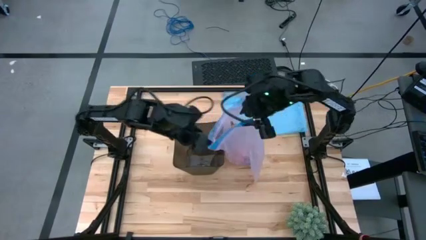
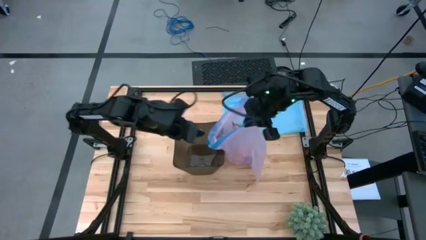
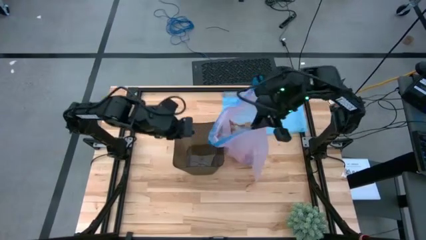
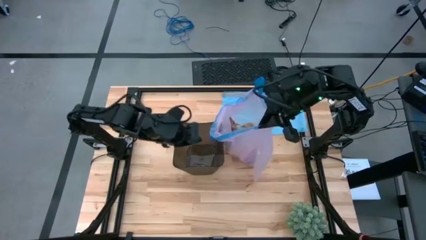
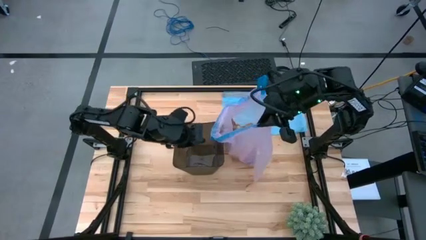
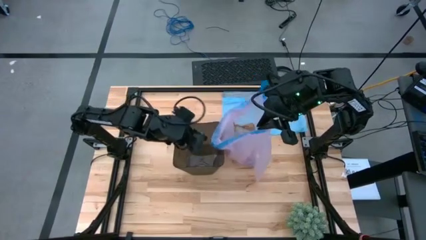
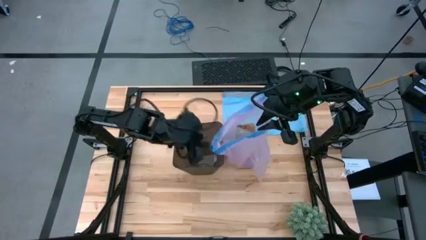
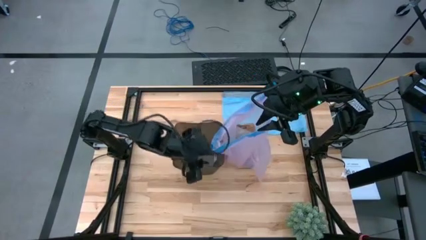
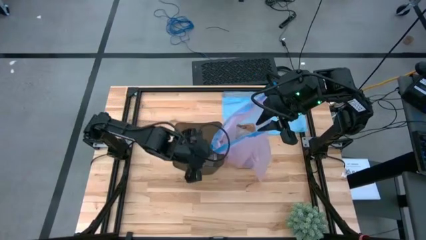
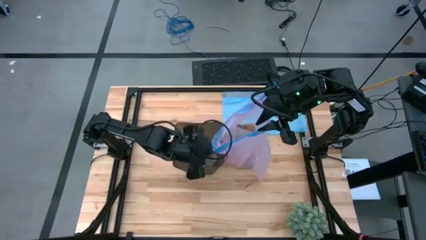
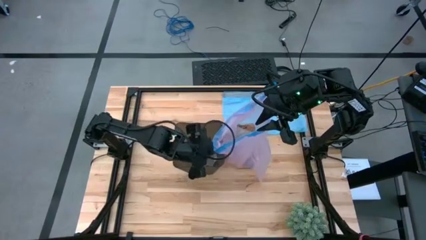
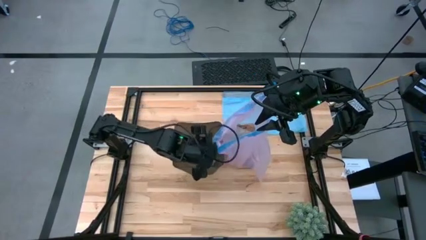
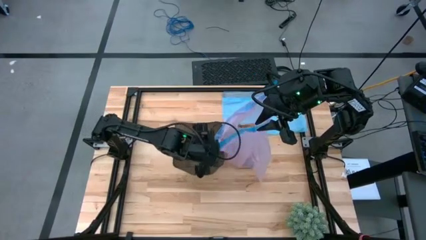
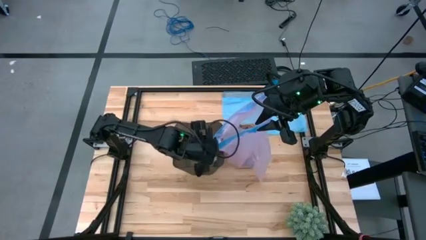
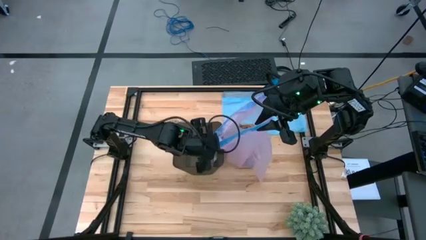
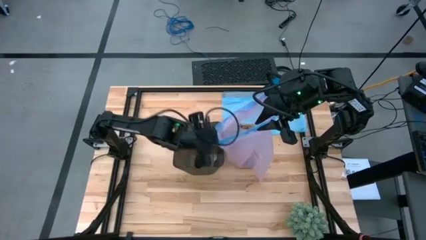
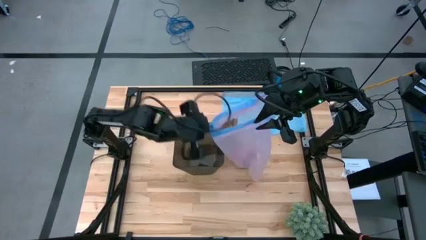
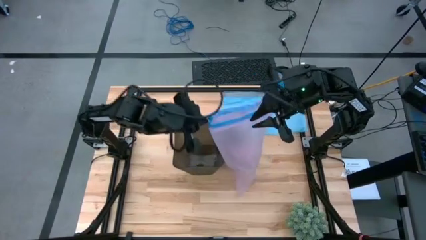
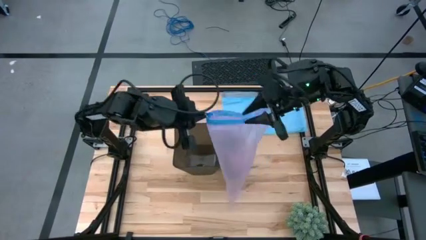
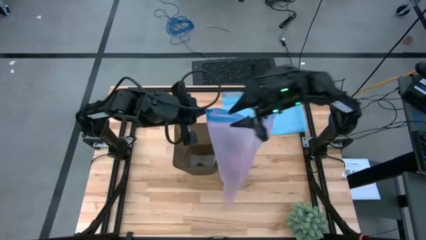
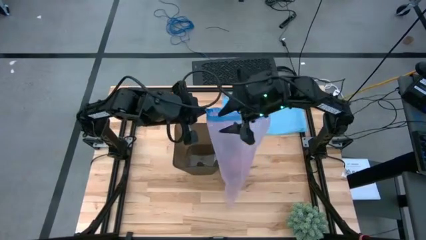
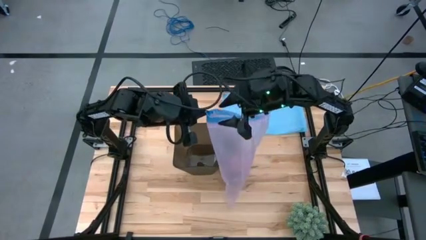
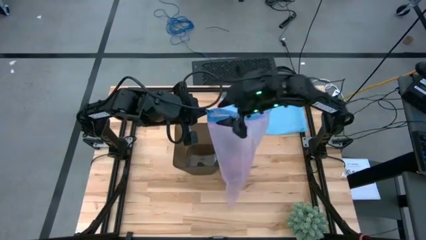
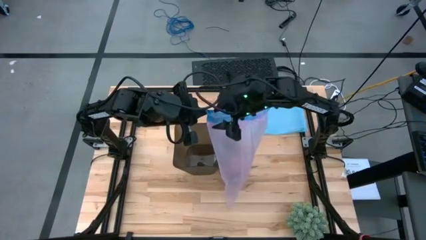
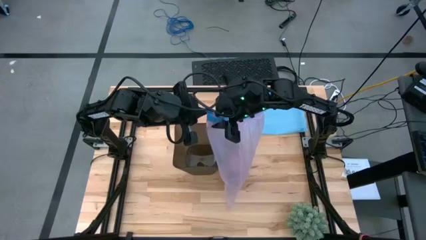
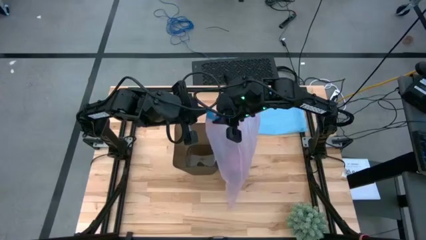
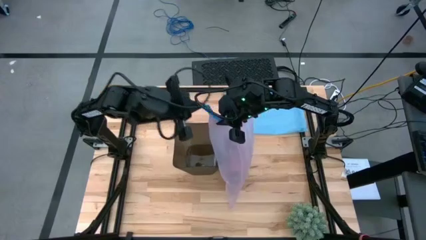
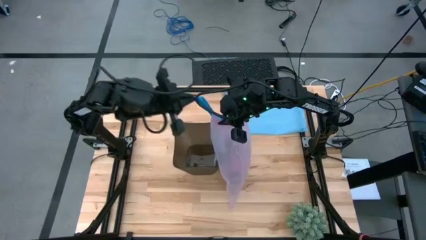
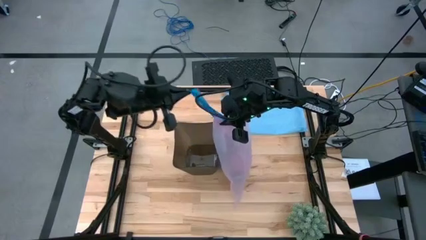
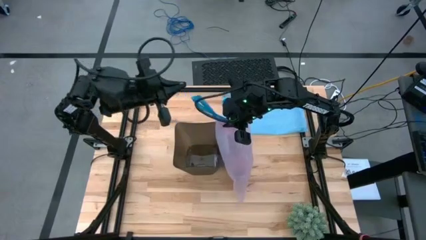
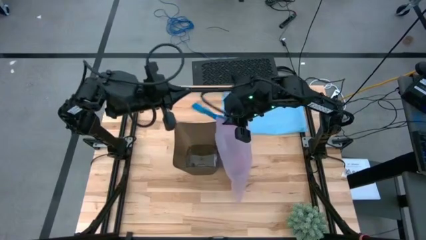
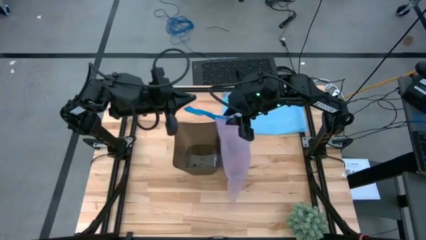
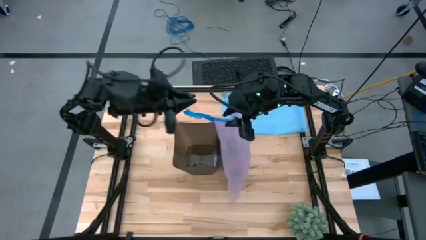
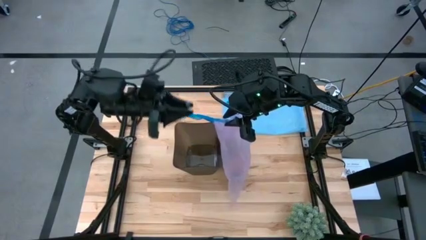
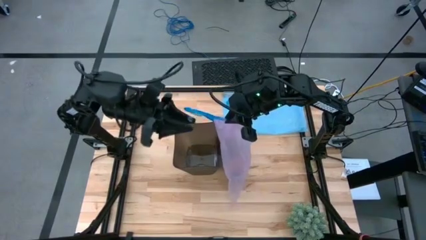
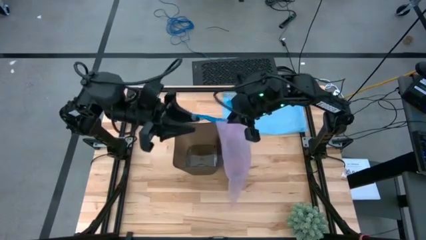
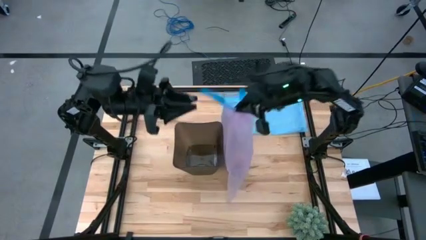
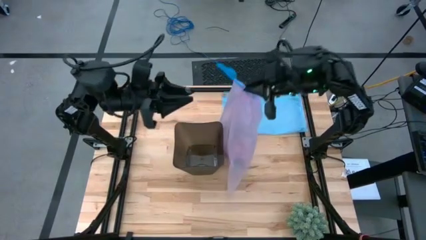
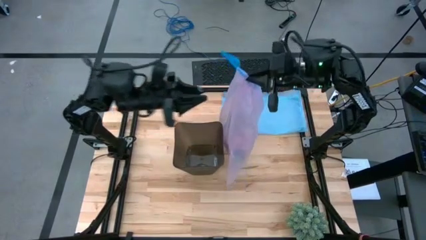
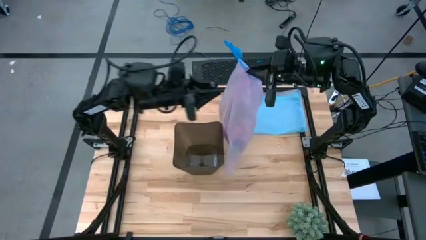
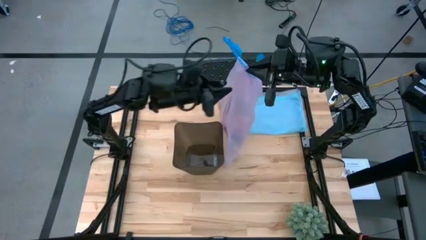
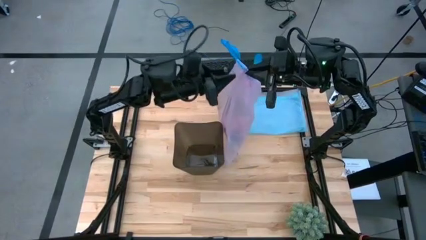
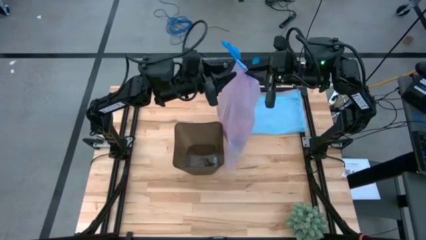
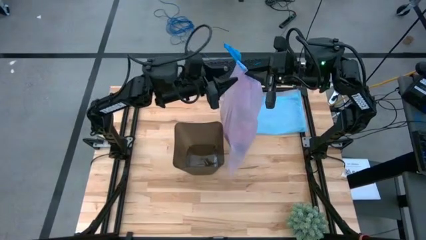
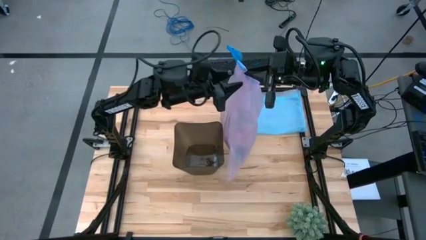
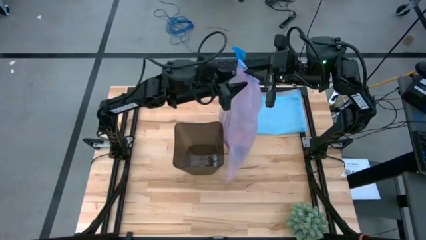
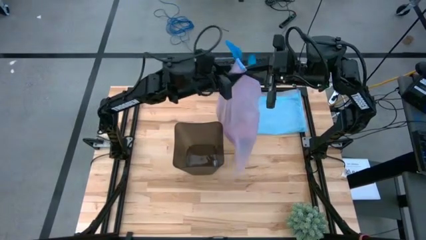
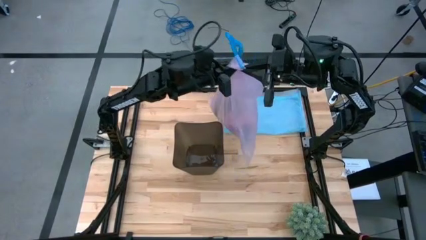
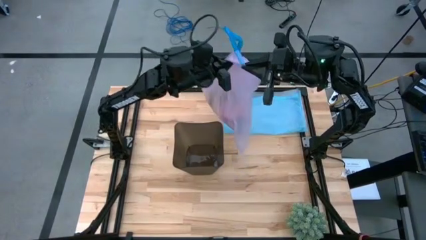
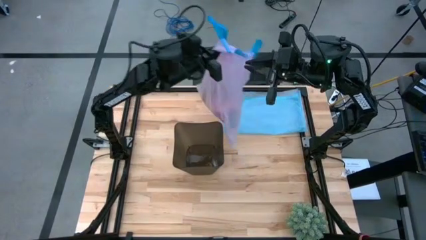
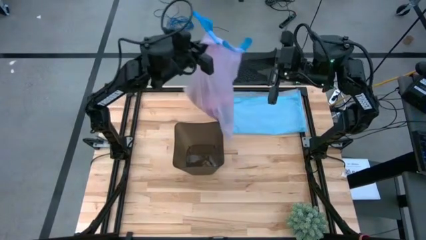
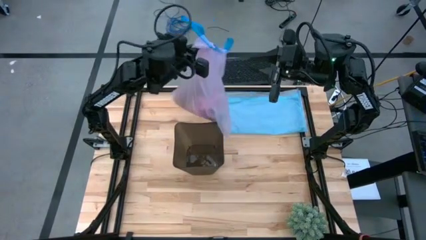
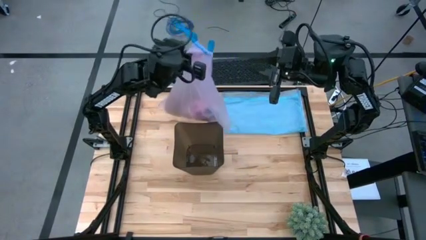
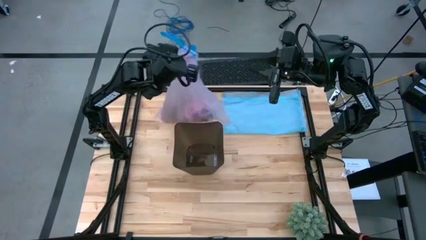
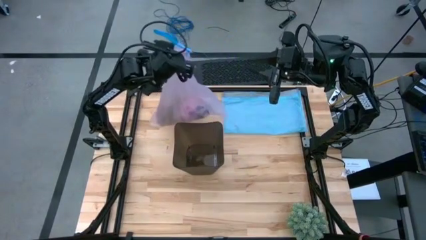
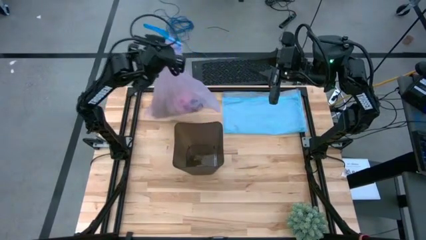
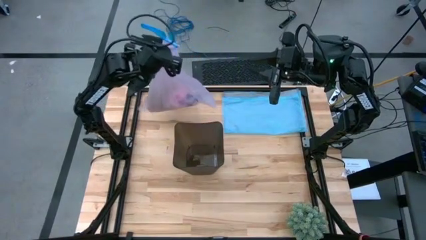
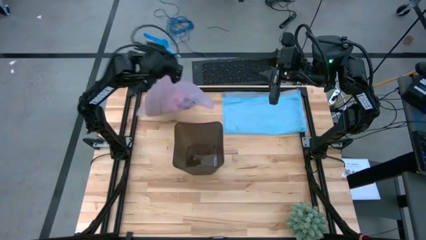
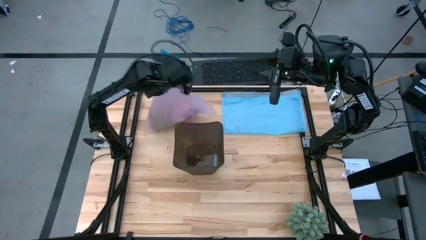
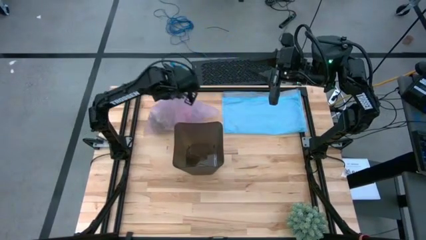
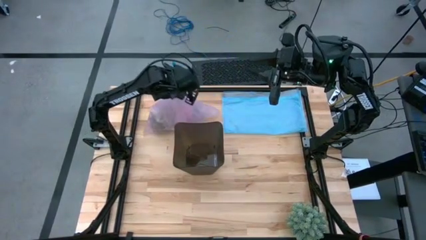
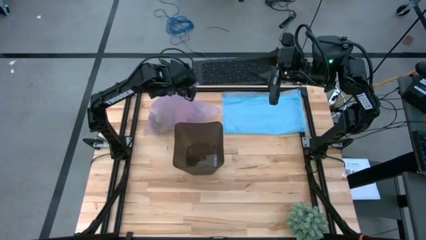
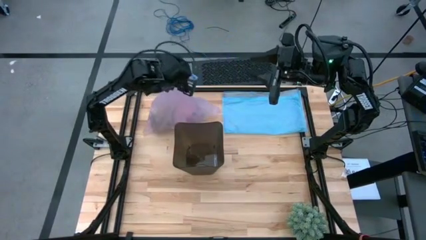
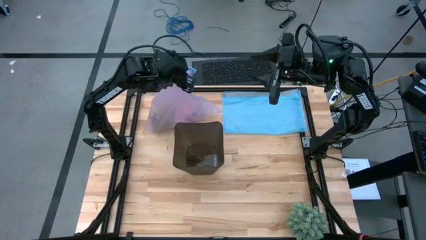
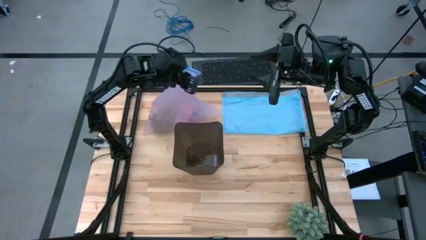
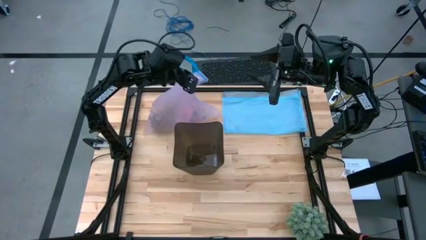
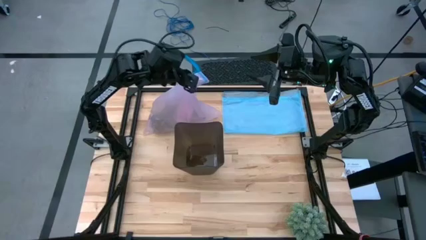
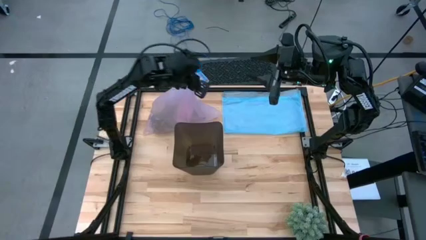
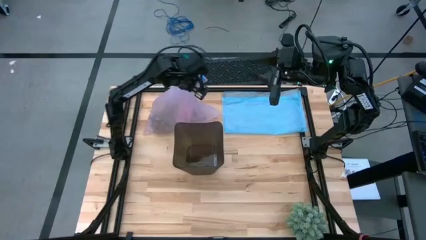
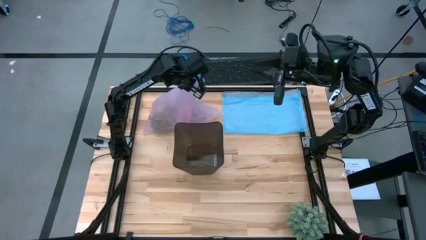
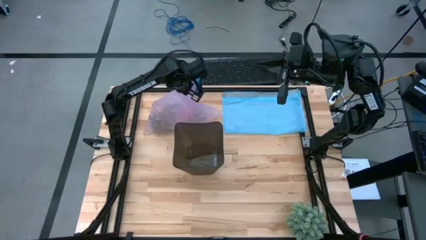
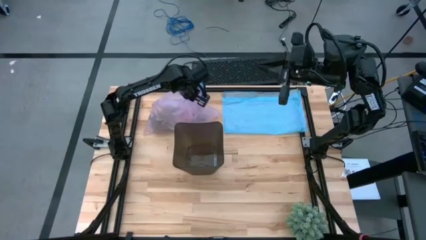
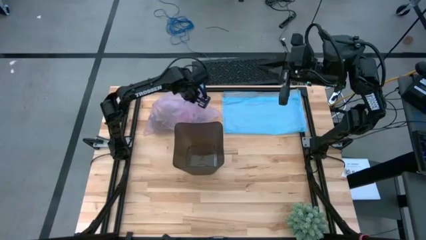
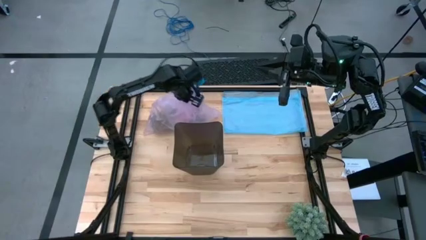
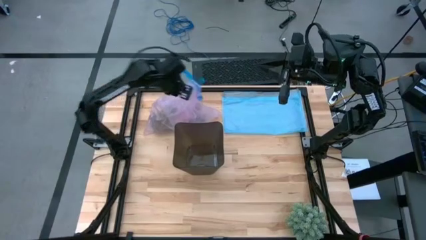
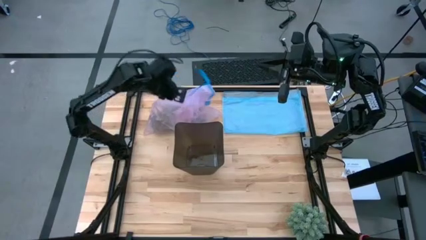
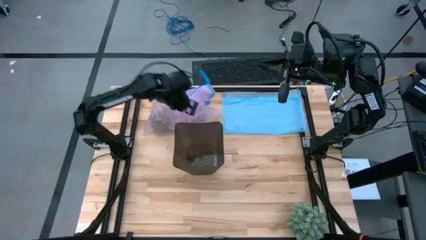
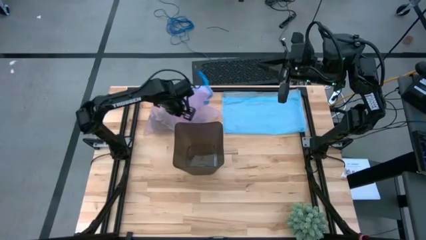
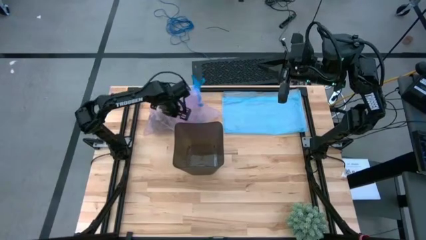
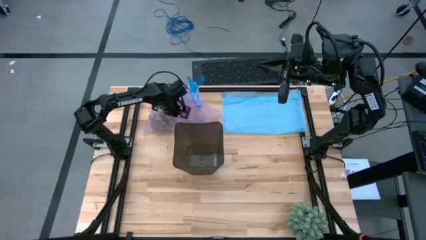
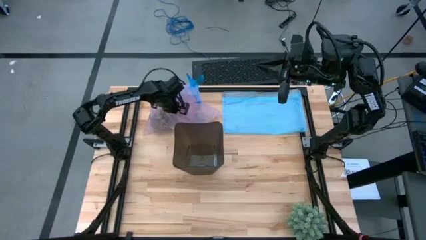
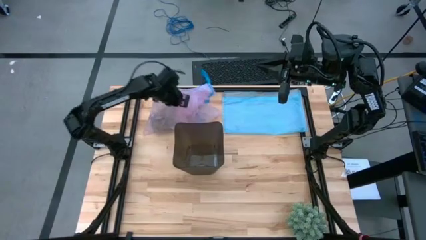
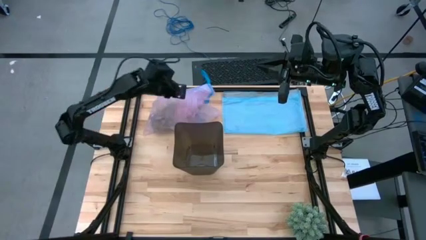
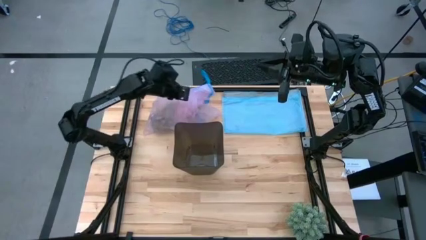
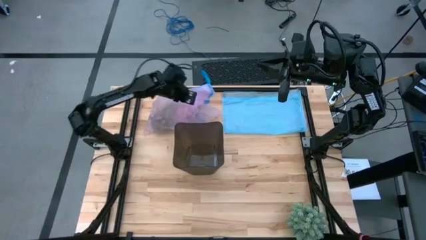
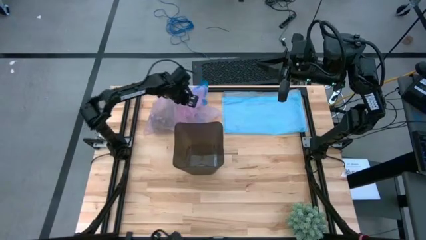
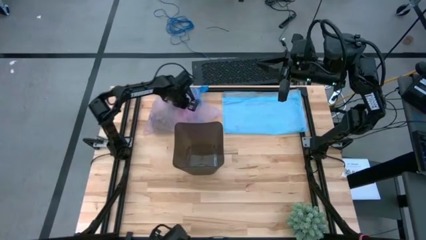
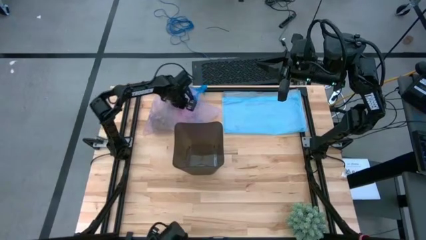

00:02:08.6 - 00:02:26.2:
Task: place trash/remove bag and relplace
Close the trash bag
